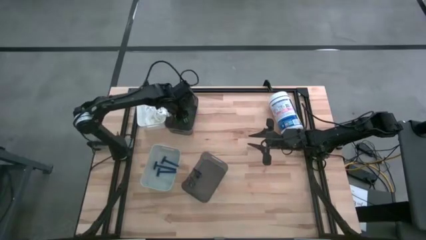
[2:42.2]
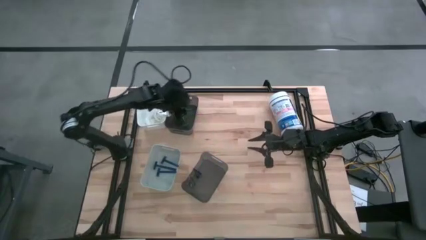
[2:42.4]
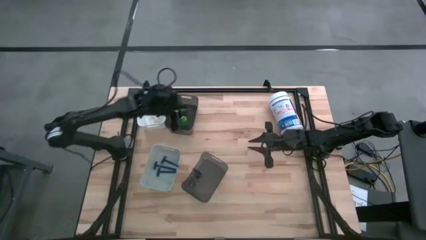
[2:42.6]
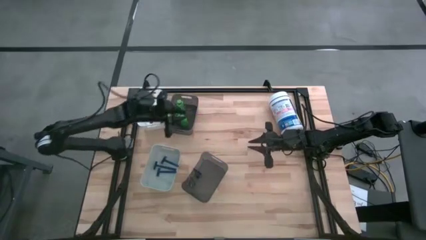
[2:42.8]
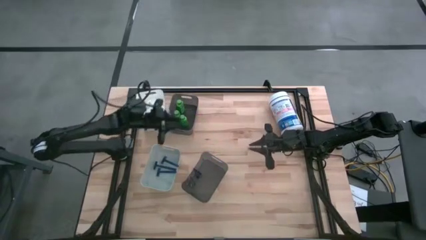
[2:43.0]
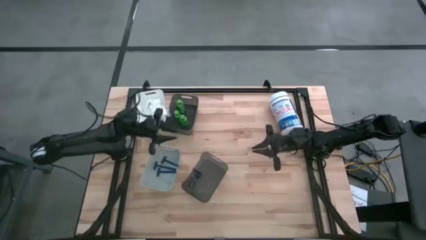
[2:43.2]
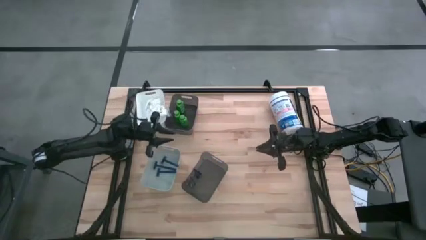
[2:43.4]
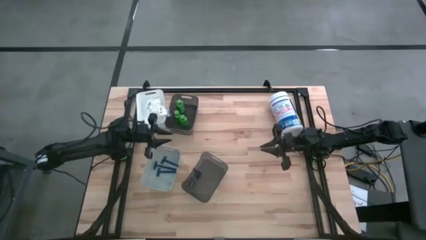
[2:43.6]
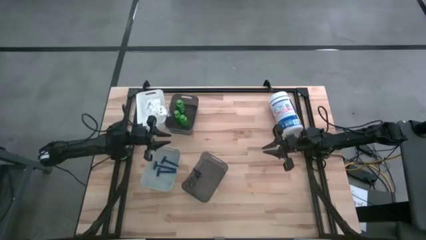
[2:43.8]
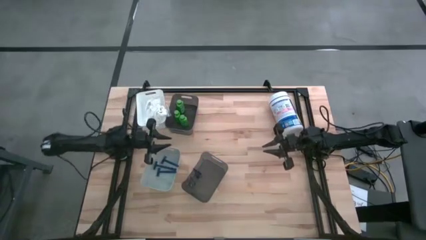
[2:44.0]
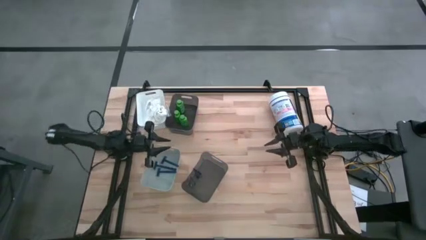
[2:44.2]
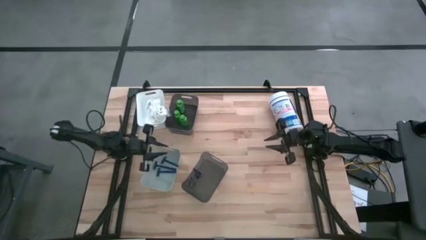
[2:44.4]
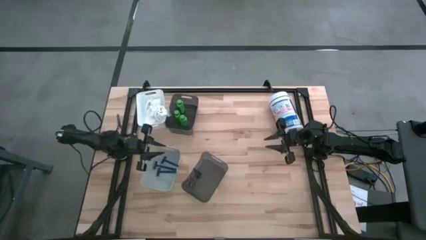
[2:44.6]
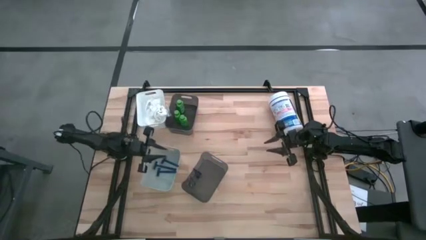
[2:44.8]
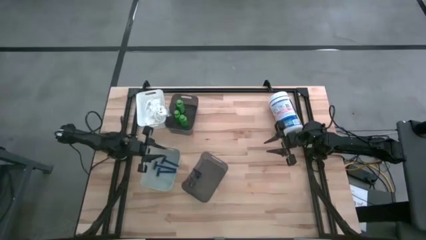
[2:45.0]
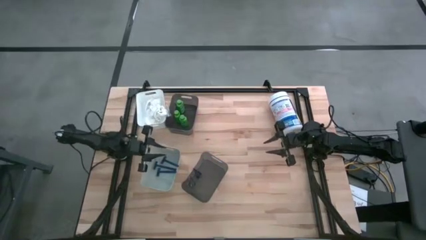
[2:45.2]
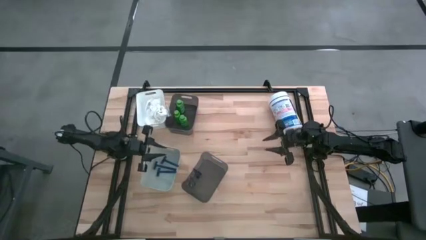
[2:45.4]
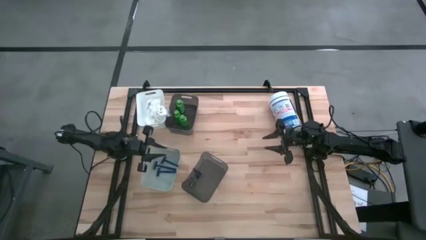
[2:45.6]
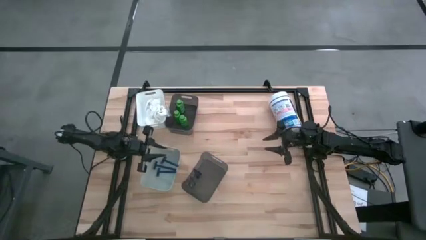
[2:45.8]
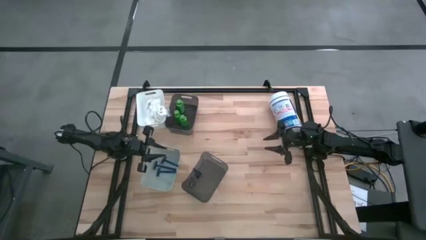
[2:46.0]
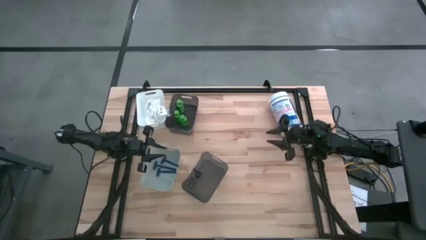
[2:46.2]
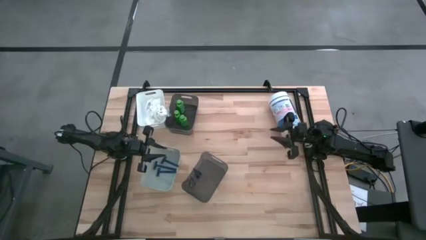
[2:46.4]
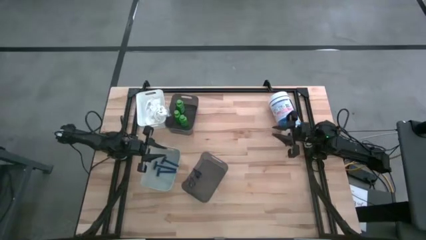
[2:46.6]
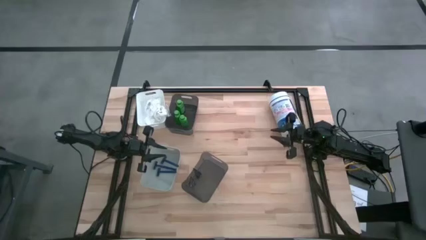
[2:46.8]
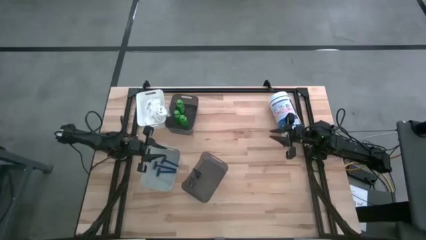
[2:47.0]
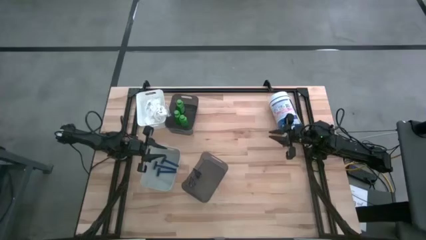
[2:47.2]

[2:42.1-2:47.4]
Task: Pick & Place Travel size toiletries
Return to Home Position

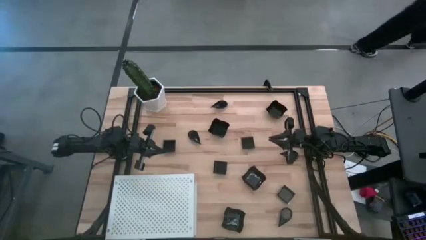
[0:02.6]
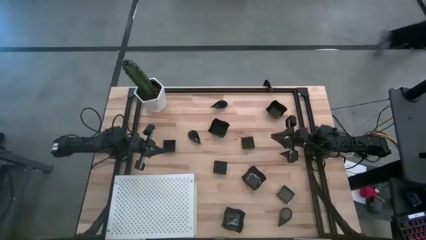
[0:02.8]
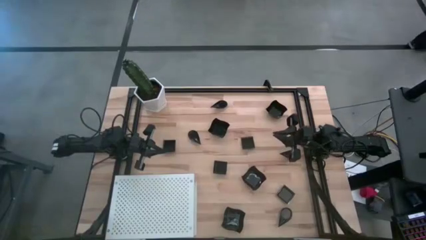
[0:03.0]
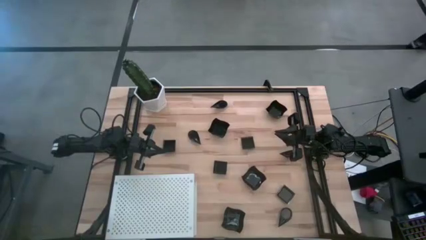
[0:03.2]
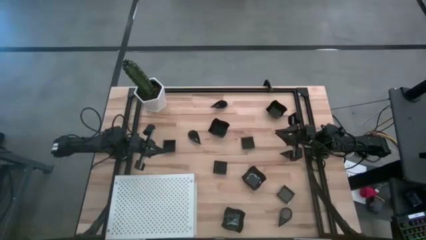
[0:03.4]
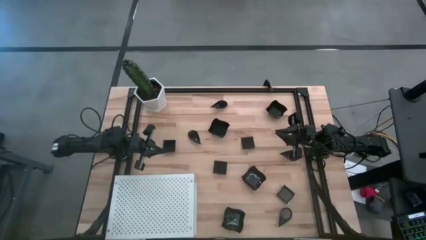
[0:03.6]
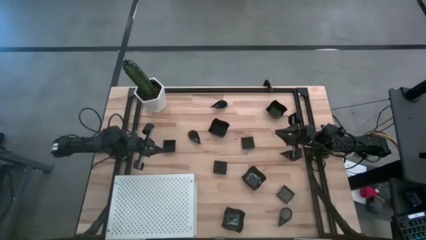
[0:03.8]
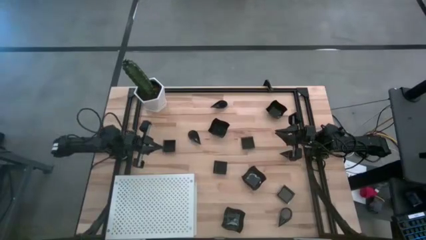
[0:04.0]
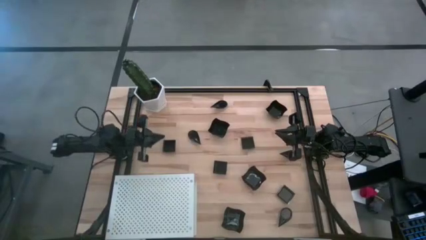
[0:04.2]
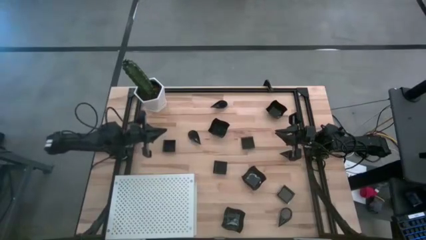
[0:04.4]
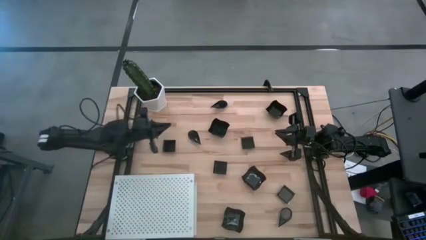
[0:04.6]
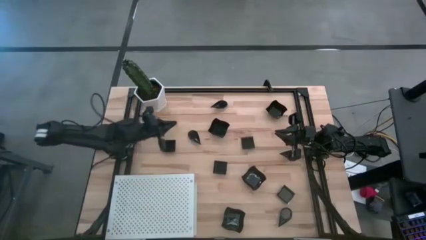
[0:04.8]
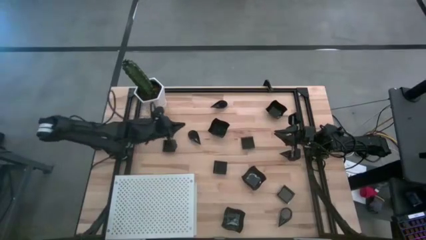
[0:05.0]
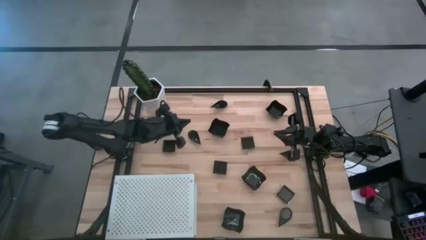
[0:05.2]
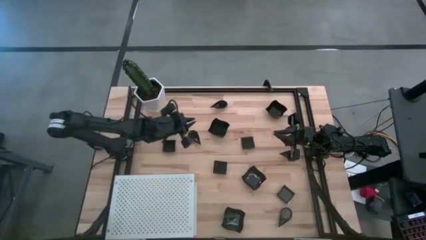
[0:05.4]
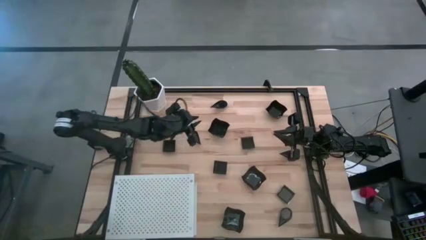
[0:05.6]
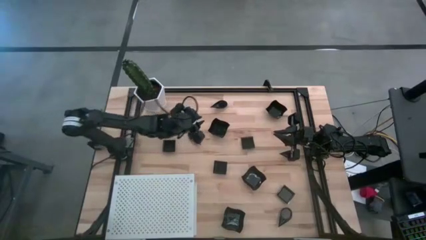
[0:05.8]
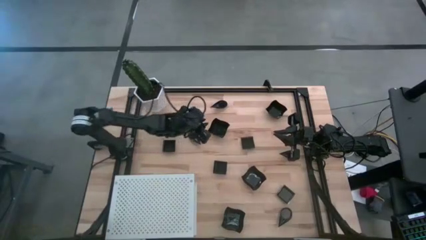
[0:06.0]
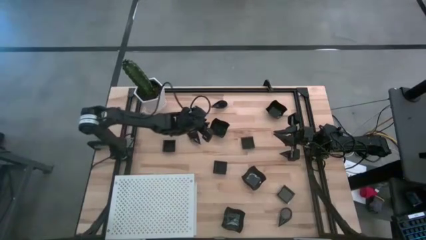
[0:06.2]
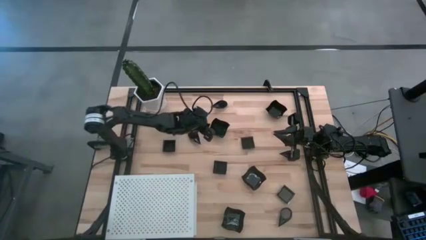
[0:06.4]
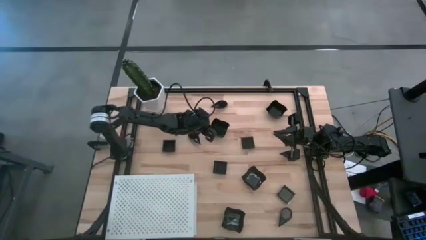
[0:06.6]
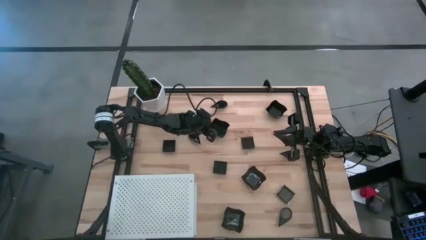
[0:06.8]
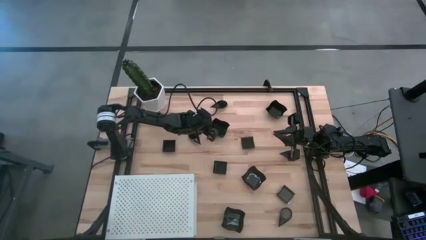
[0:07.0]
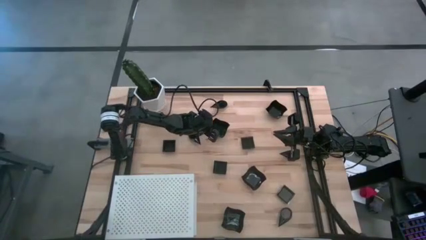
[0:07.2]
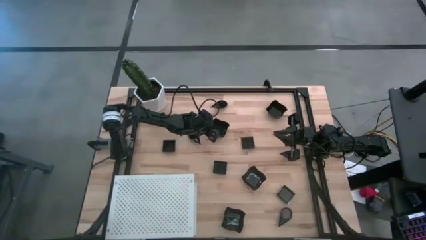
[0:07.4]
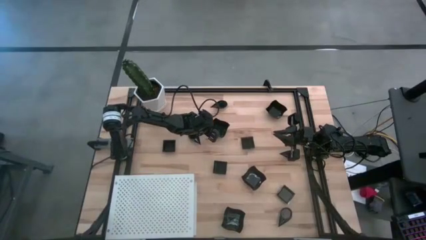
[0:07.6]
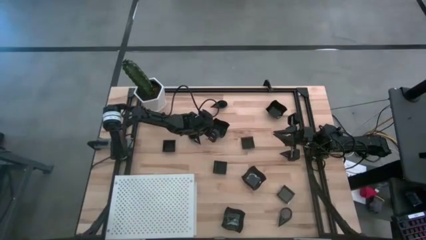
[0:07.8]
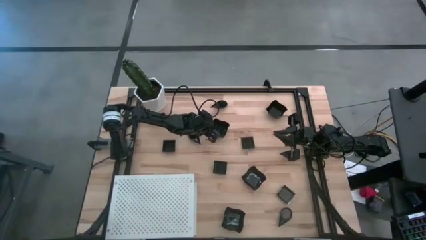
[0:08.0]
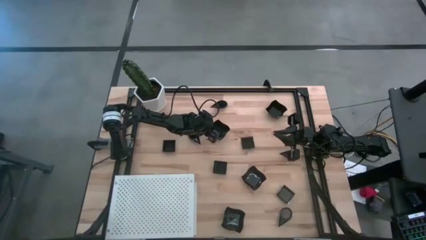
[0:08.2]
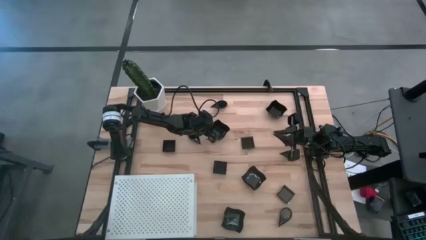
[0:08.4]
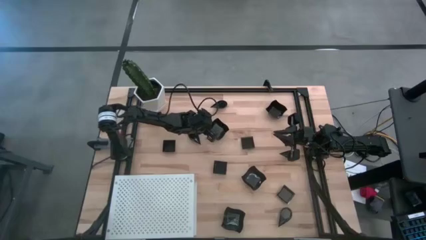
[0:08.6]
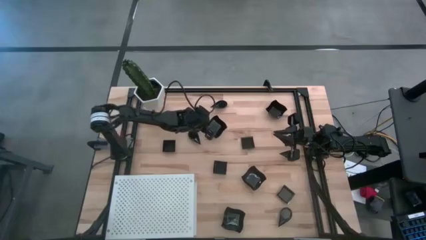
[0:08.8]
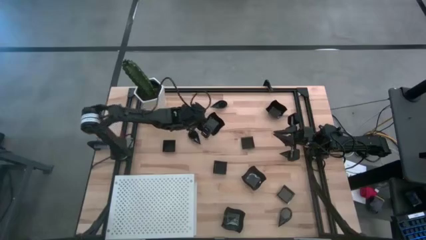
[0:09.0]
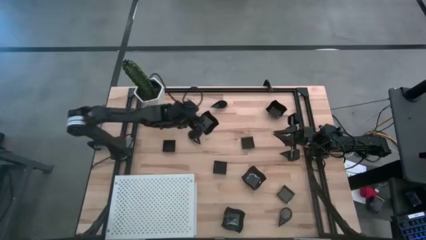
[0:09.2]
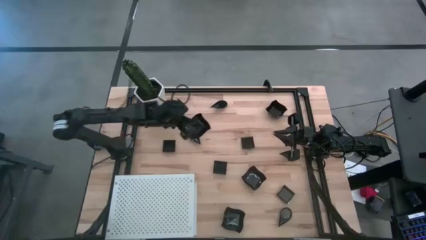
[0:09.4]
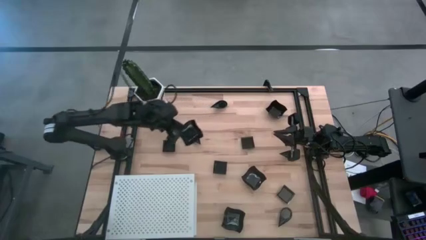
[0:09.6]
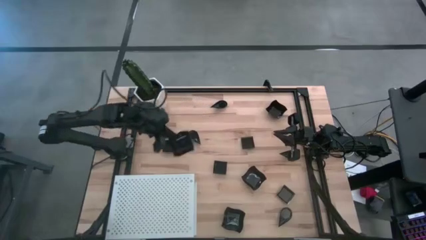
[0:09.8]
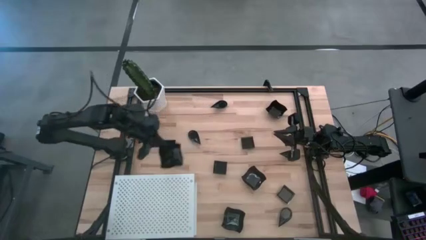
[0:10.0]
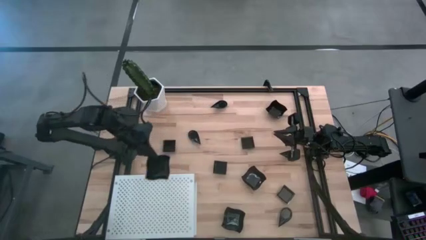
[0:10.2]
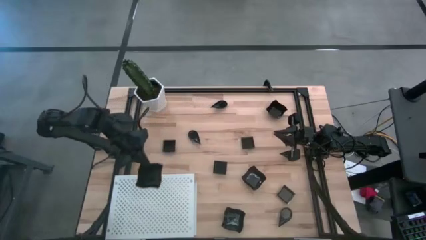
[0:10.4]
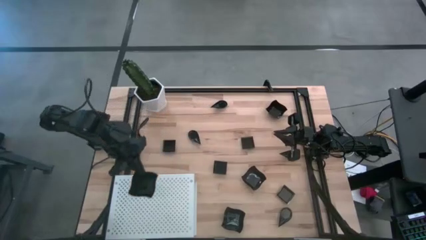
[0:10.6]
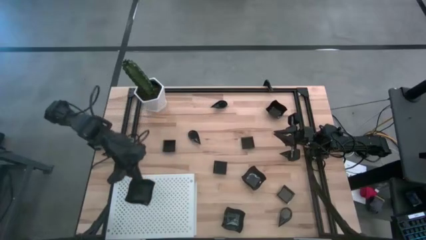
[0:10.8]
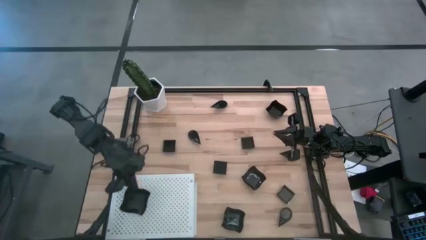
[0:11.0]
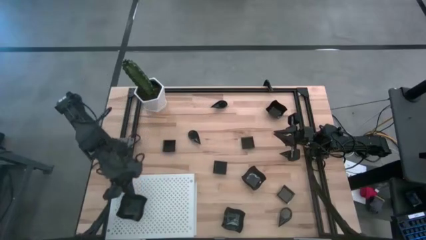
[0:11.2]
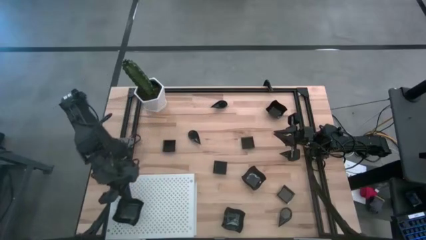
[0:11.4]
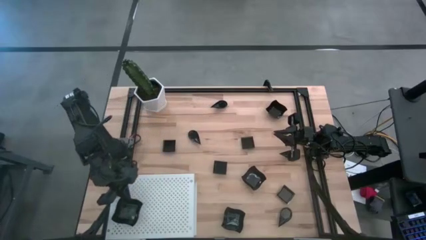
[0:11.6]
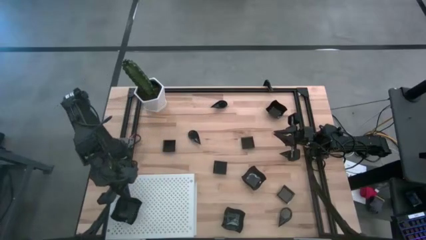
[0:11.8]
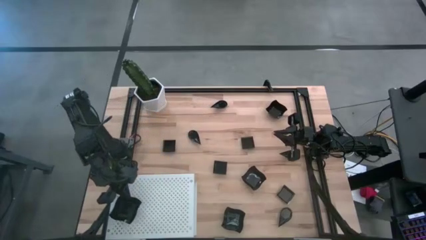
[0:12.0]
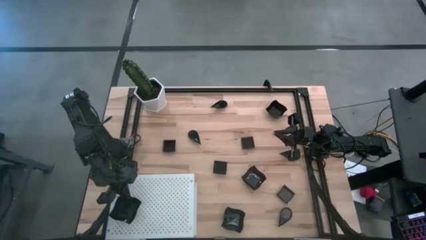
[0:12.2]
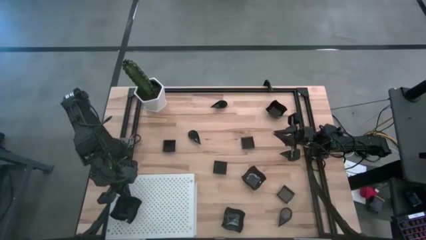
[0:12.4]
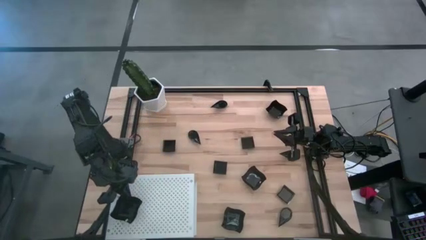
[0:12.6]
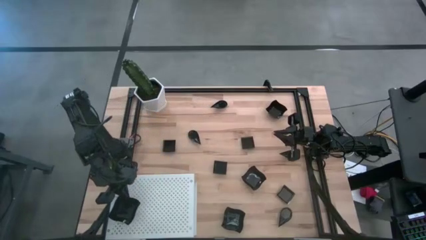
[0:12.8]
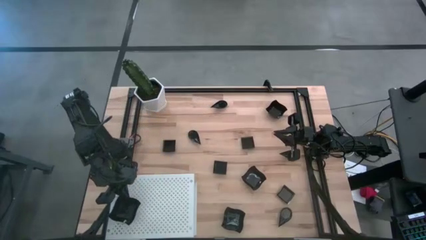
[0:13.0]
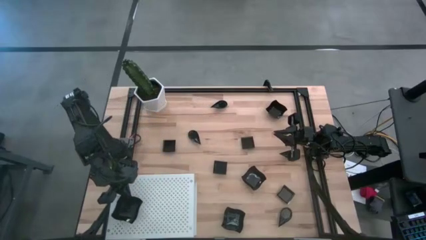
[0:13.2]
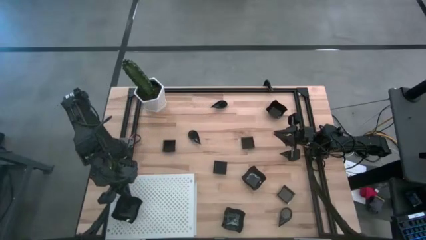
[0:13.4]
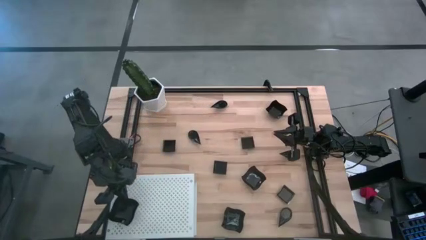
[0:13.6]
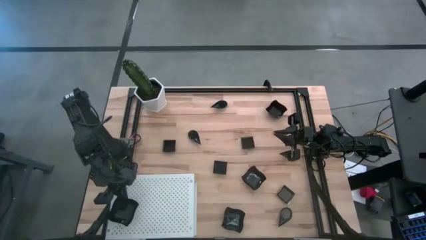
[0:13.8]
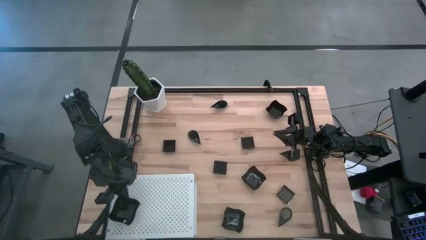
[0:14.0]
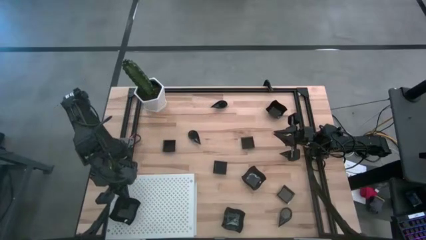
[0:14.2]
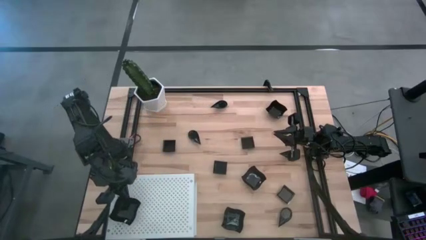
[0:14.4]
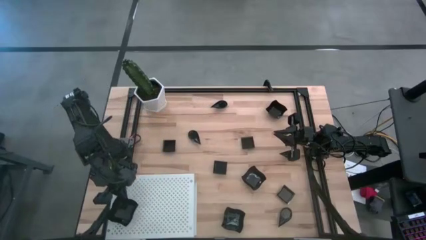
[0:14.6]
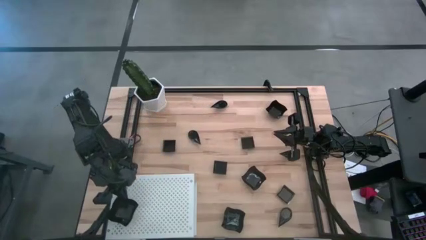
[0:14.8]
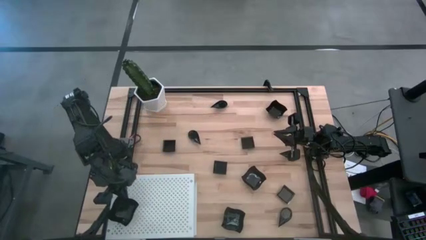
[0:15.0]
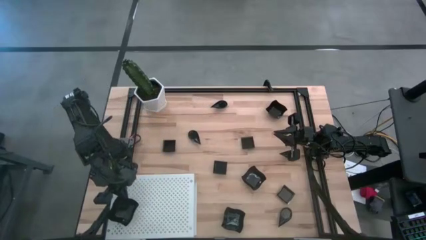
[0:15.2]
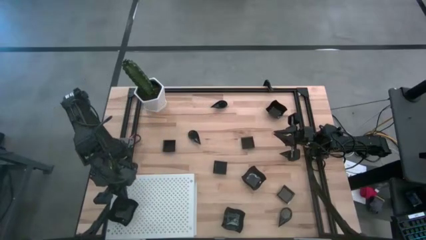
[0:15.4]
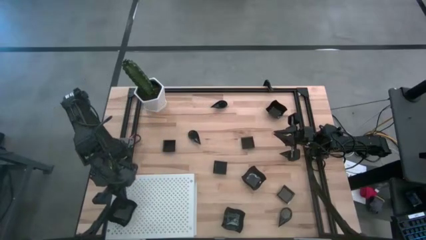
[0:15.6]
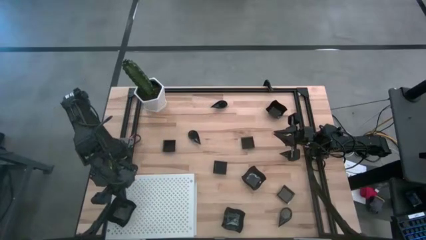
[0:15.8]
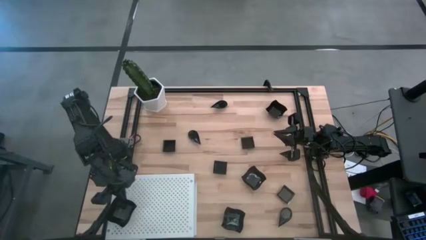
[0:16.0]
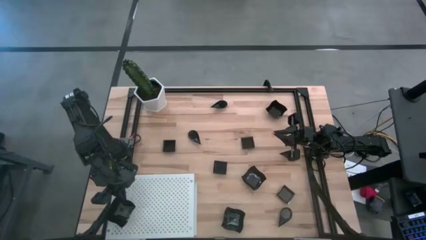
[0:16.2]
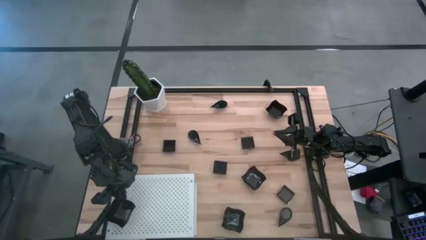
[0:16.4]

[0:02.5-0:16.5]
Task: Pick & Place Mini shaped plates
Put the distorted square plate on the shelf
